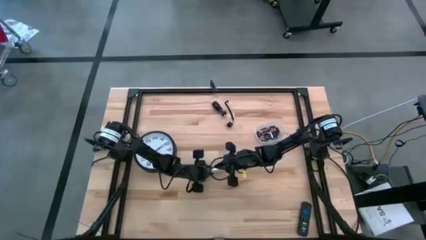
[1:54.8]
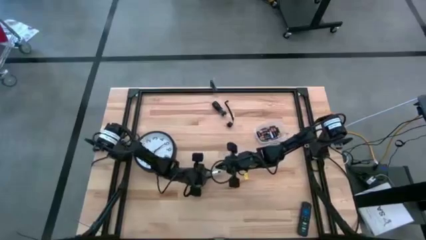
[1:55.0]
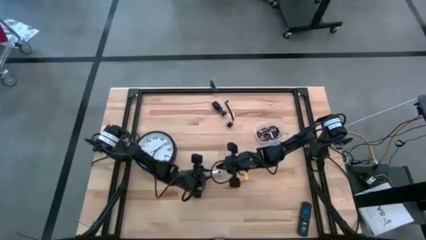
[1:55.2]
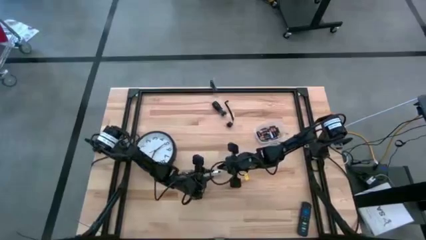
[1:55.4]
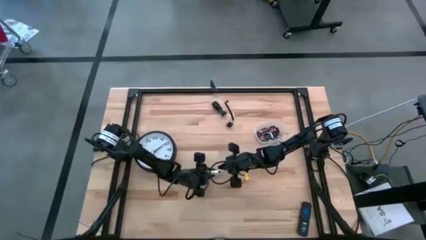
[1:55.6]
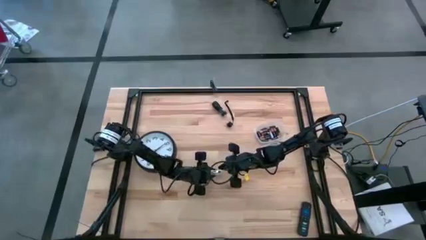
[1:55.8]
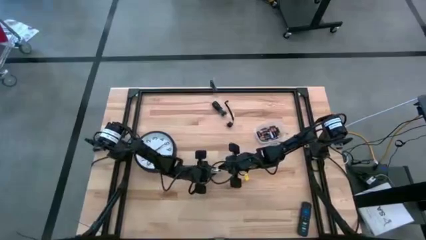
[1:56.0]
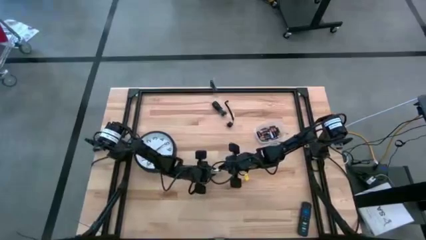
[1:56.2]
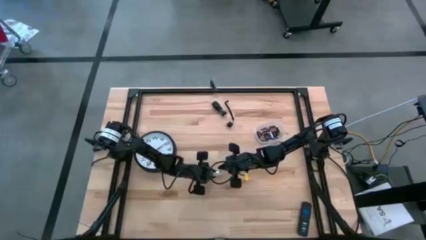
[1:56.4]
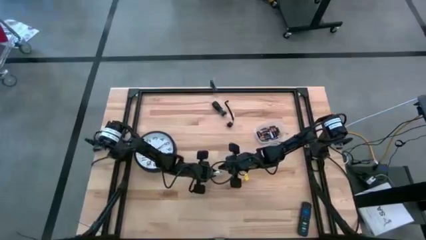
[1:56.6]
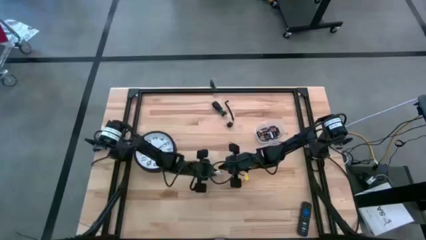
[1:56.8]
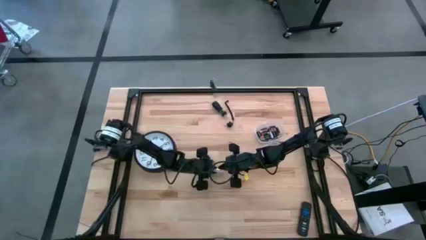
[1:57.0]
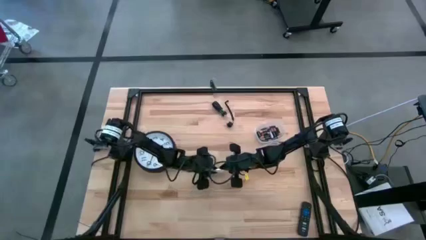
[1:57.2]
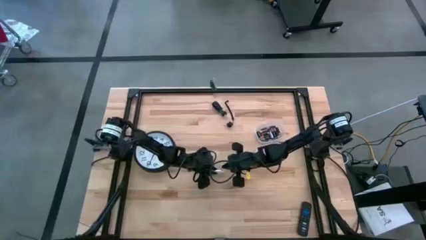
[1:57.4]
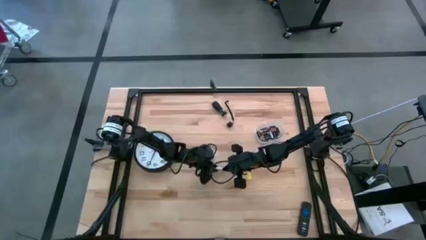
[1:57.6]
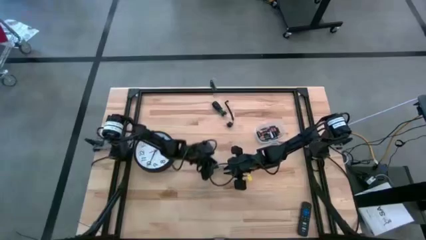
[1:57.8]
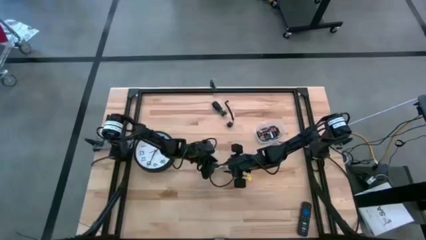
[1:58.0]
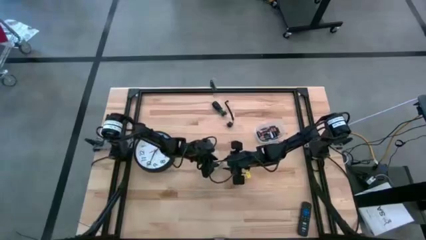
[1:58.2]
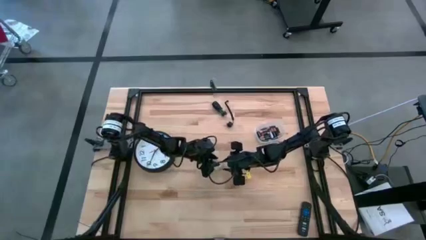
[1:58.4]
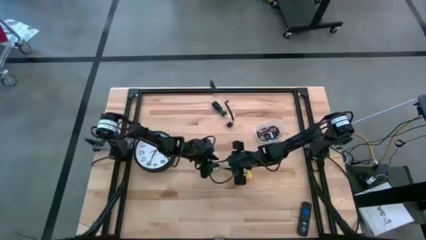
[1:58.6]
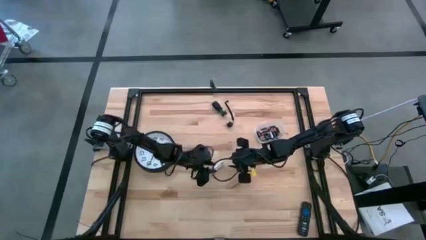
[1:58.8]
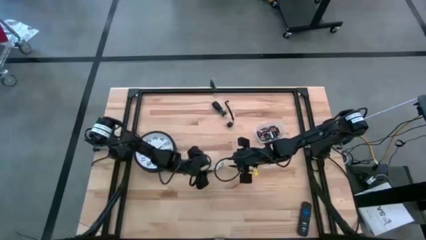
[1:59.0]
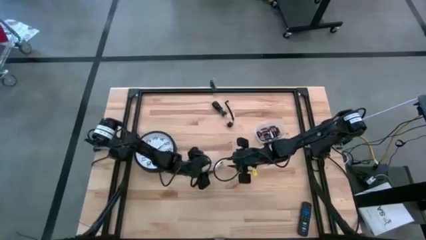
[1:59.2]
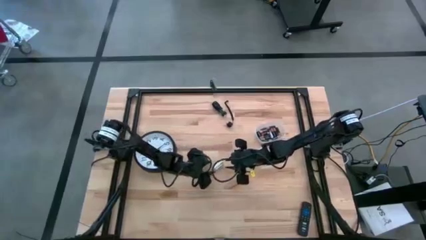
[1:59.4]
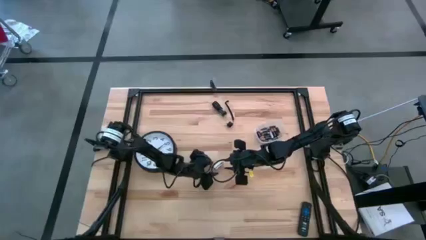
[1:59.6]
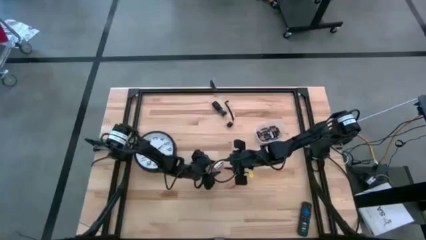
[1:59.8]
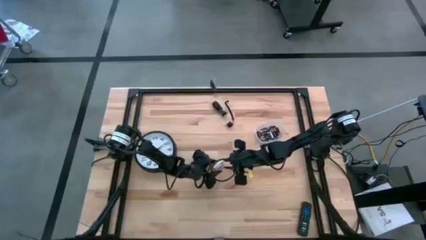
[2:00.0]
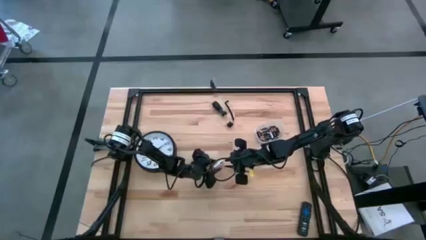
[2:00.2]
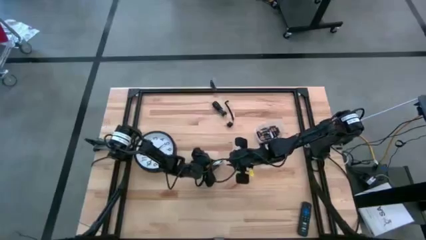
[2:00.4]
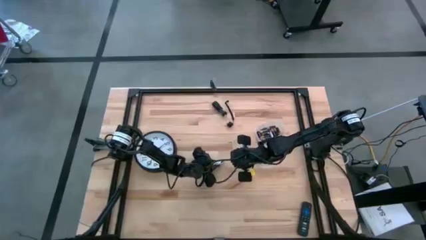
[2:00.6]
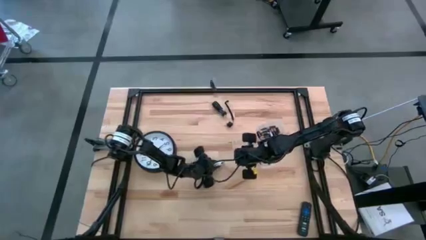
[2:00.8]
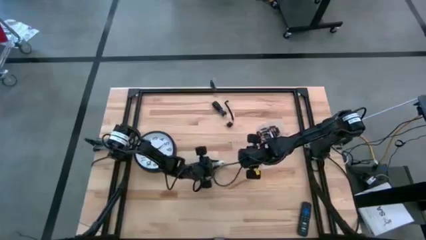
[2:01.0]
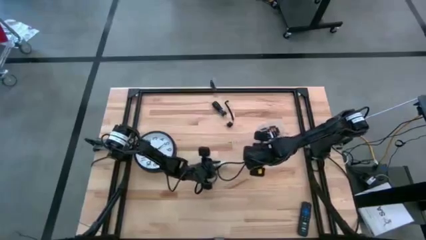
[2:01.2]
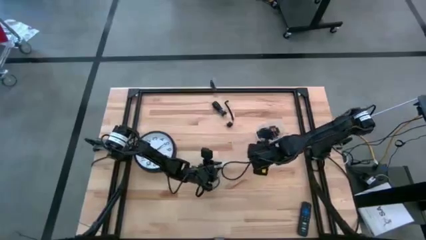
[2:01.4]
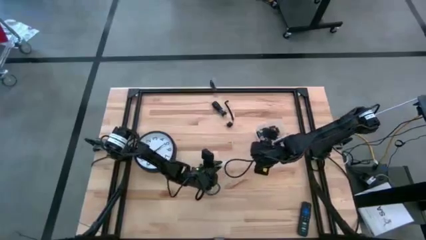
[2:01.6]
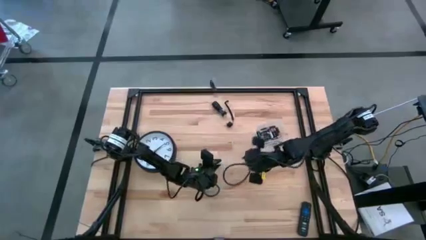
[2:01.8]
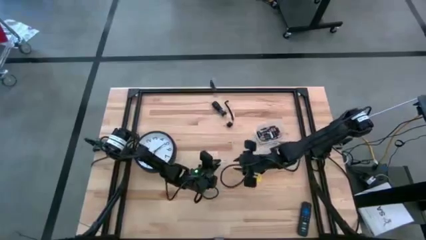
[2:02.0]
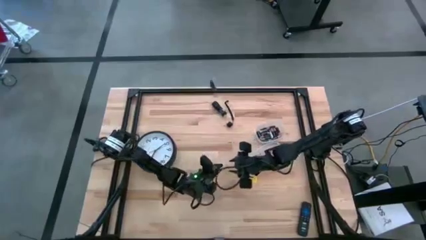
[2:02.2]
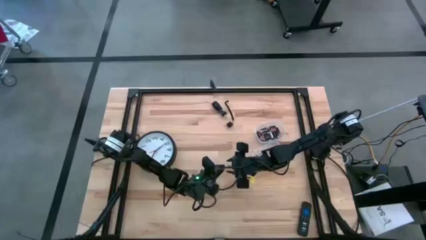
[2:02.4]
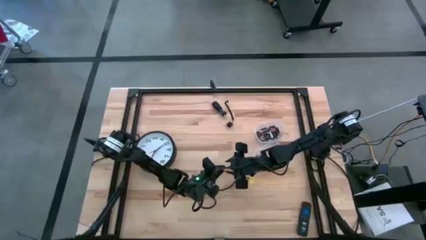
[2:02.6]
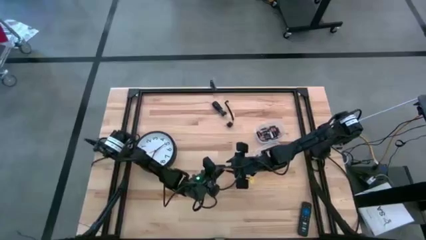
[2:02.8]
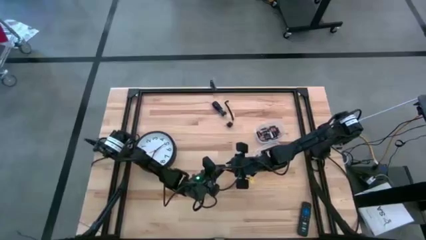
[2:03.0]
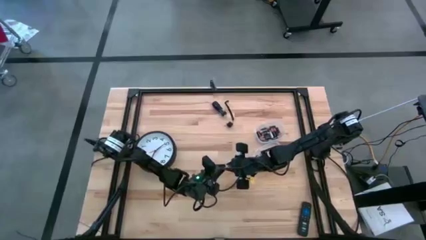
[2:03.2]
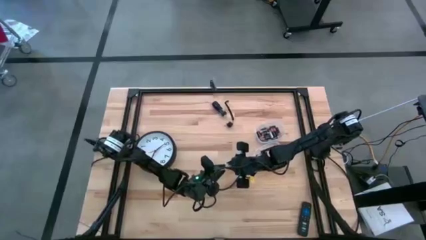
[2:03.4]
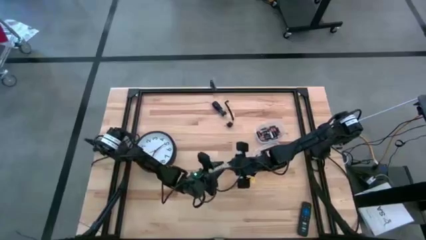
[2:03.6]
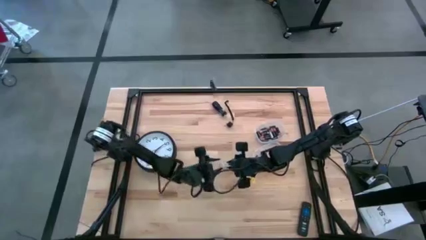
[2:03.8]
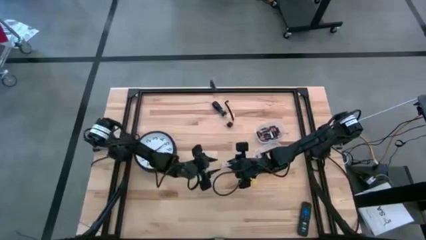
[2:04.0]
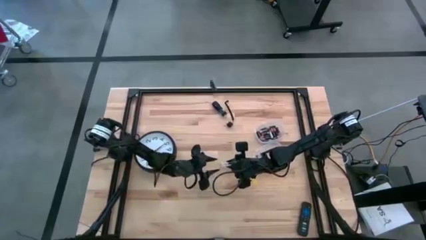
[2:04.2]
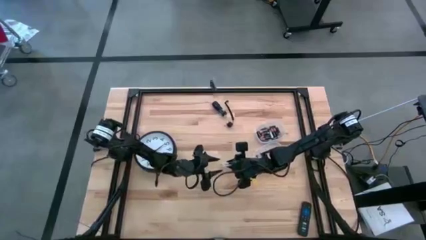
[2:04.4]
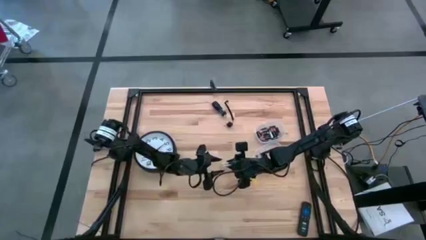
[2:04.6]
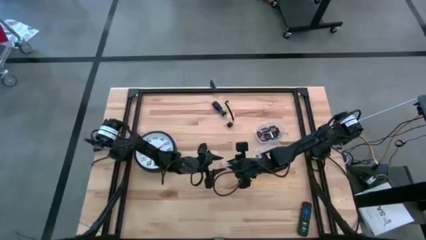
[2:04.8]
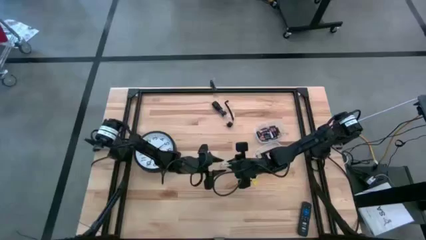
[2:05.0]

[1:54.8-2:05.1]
Task: Insert battery
Insert the silver battery into the white flashlight battery holder

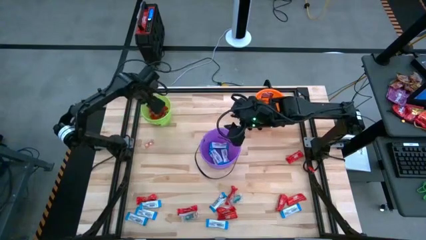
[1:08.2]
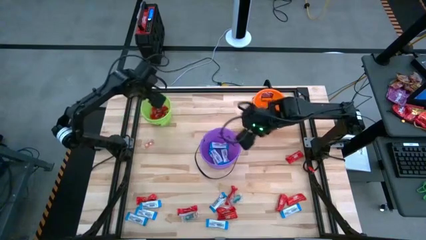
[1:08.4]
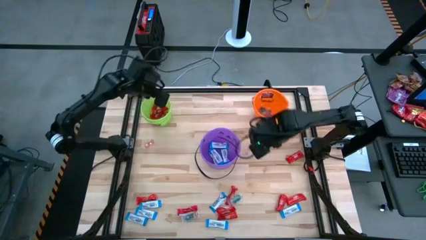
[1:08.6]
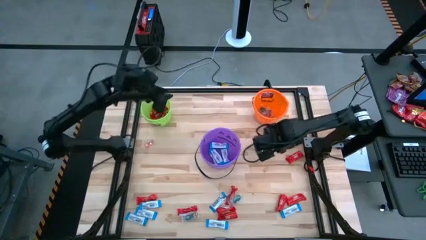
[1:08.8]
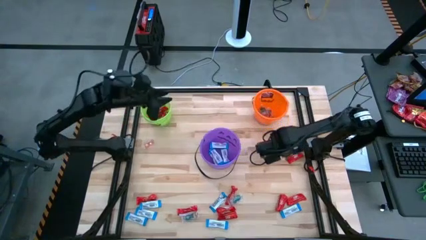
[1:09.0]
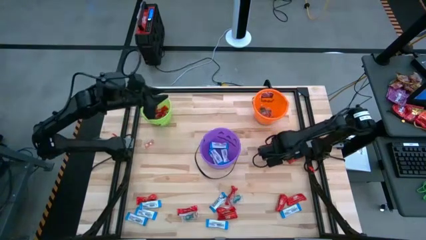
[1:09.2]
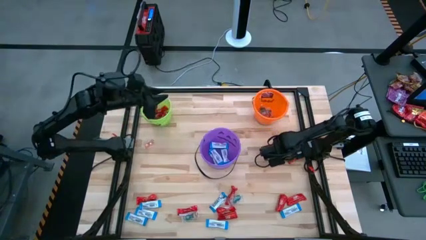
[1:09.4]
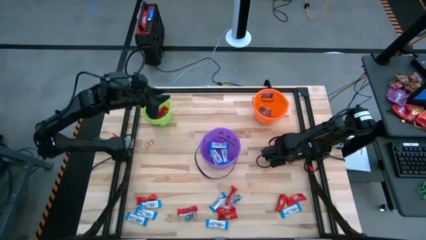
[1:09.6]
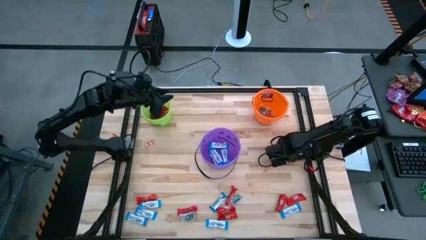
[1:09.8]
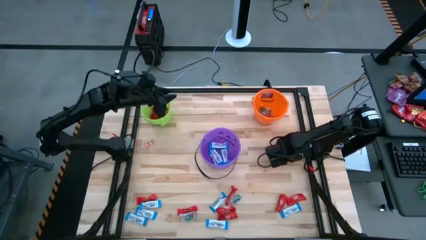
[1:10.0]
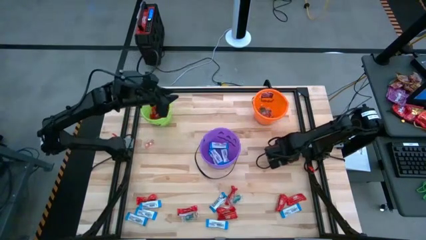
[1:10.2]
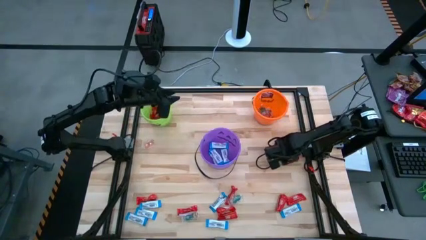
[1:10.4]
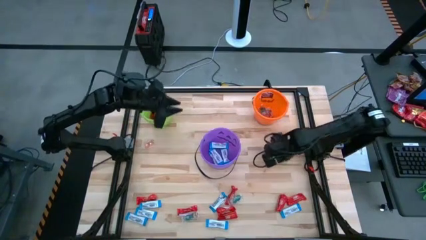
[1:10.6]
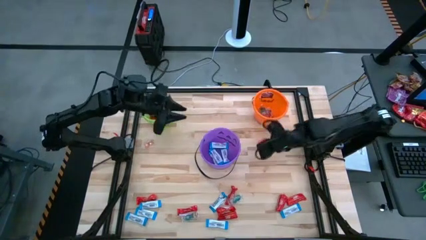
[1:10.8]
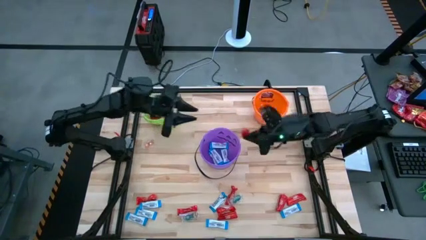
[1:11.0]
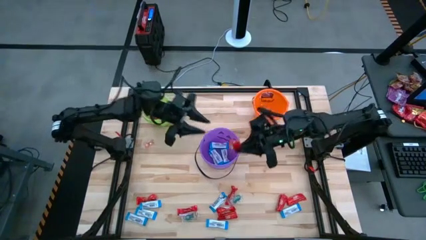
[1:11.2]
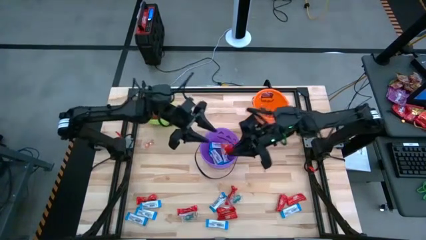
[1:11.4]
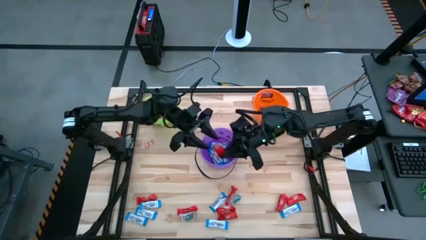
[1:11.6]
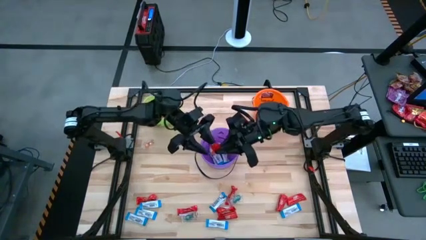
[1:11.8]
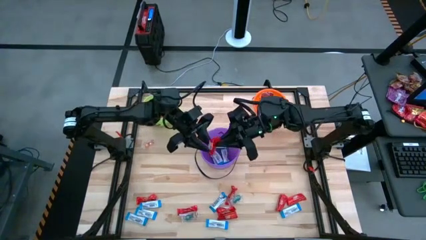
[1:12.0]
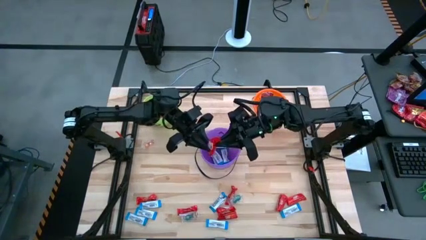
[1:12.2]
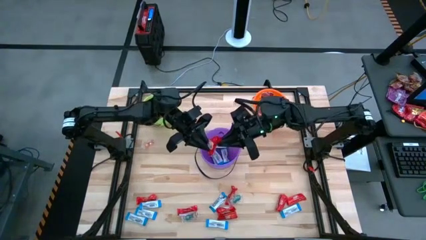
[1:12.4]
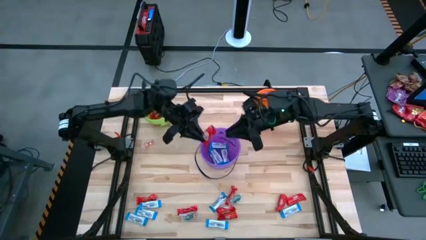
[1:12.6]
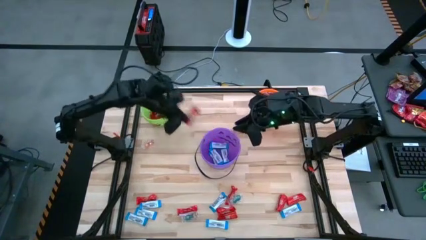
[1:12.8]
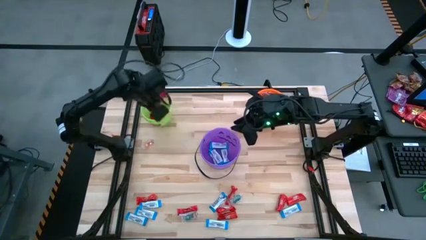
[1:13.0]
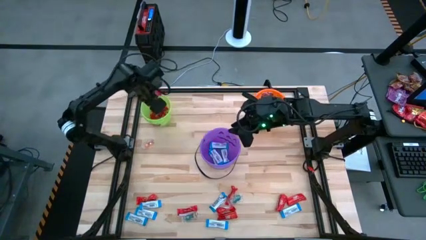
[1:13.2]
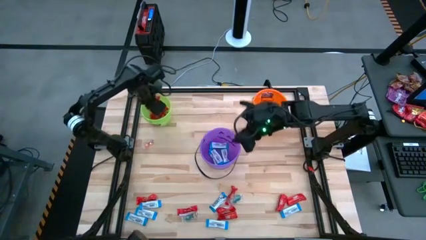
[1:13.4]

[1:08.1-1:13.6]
Task: Sort candy by brand, put in halloween buckets
Put the red chocolate into the green bucket
